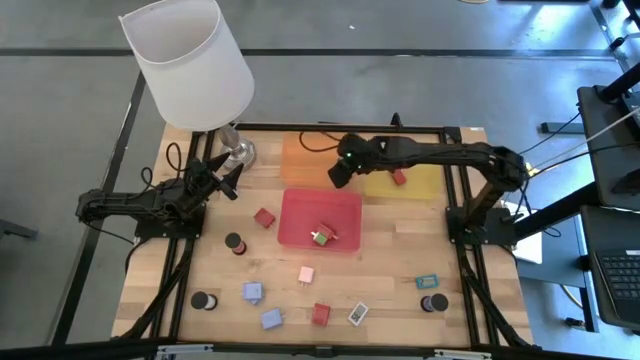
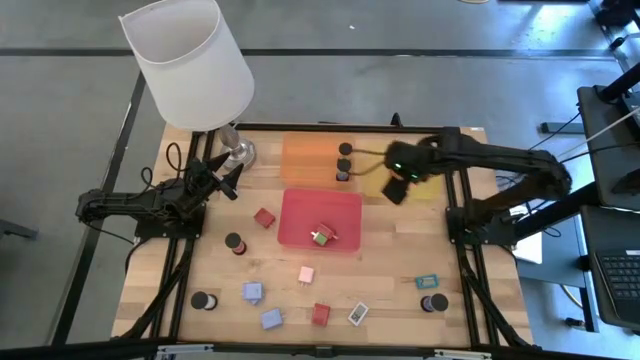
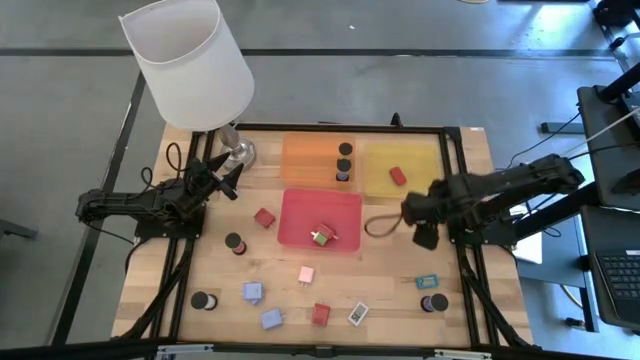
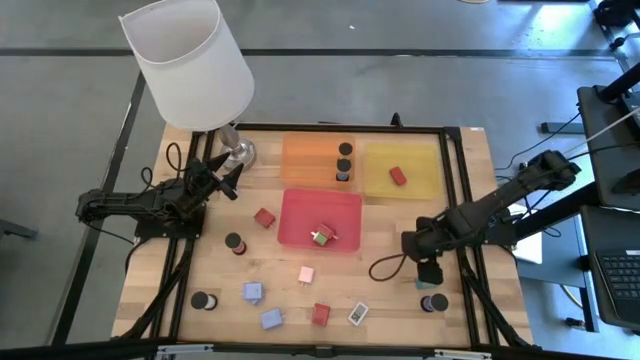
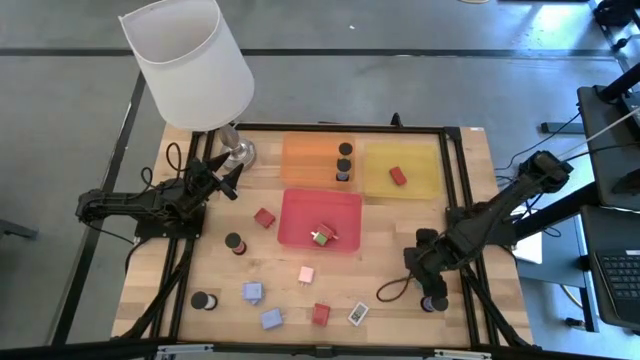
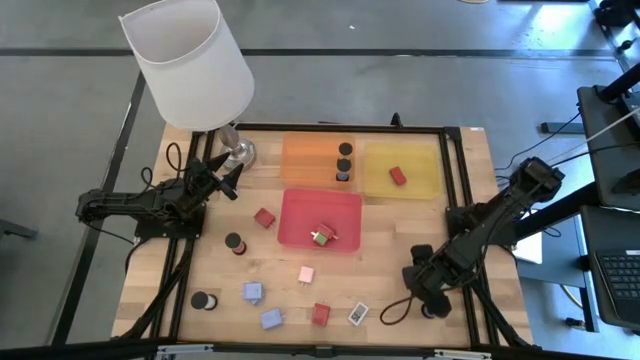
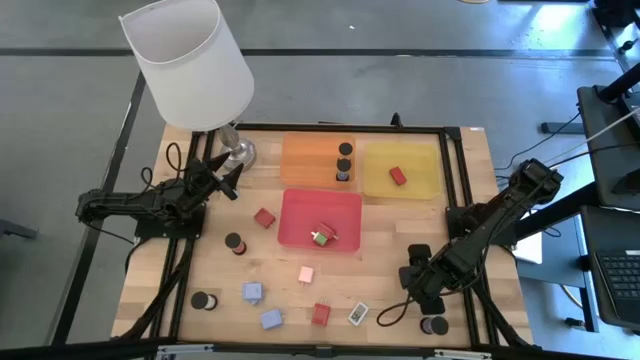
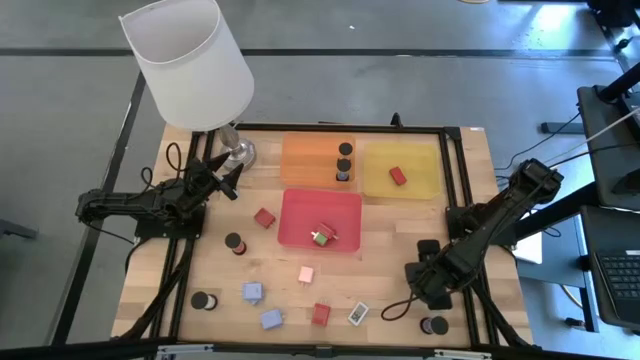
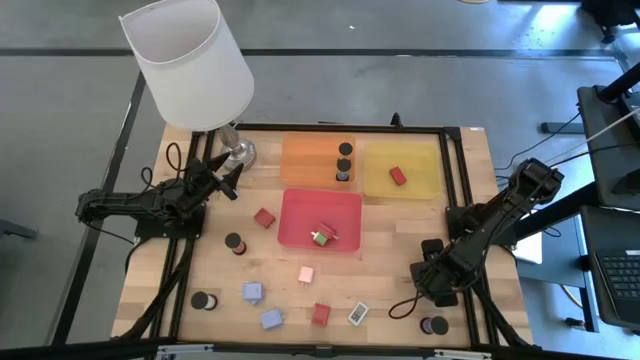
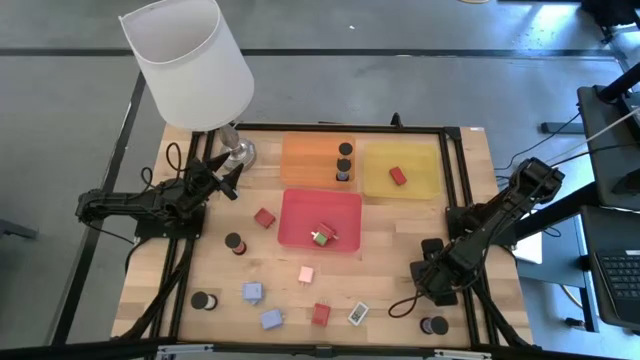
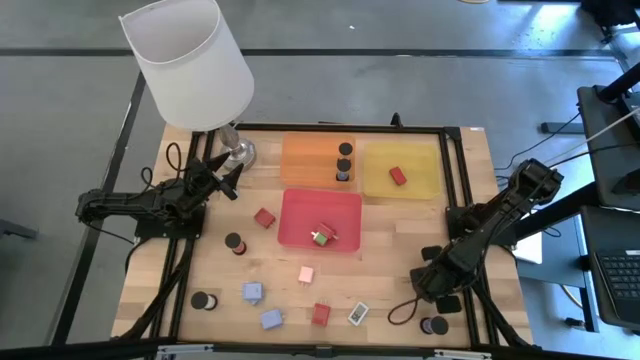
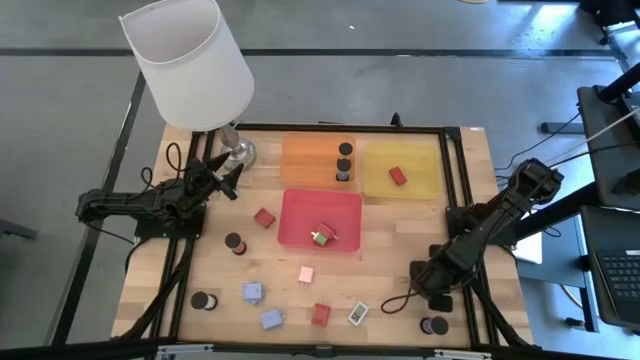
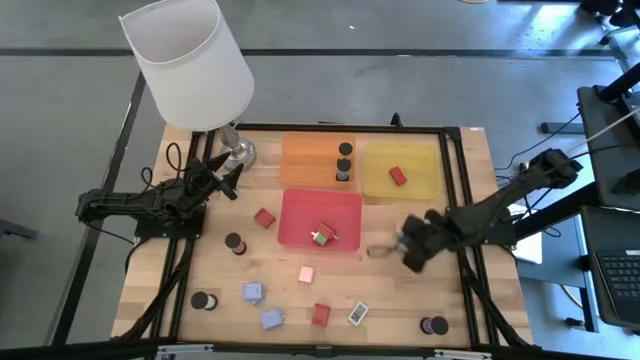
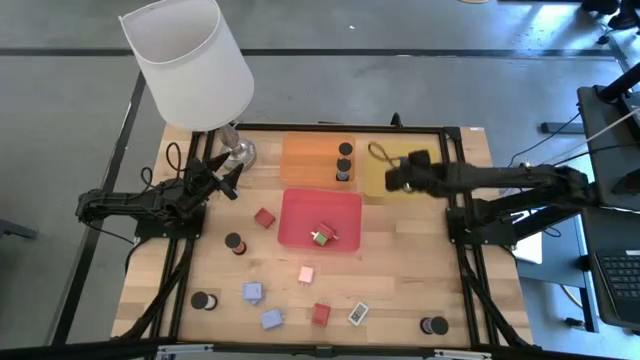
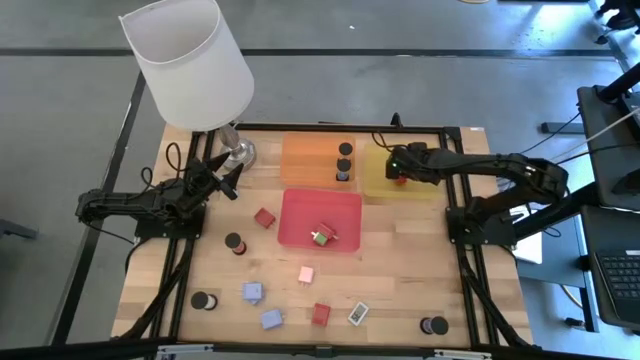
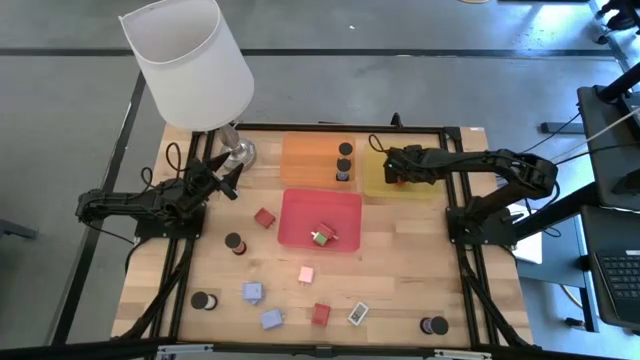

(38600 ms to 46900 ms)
Task: Pick & Place Office items
Put the blue digital clock into the yellow bin

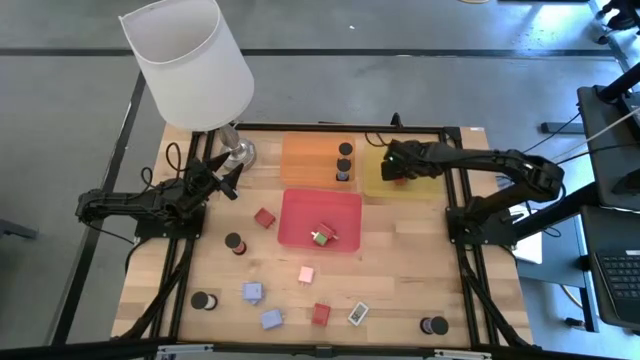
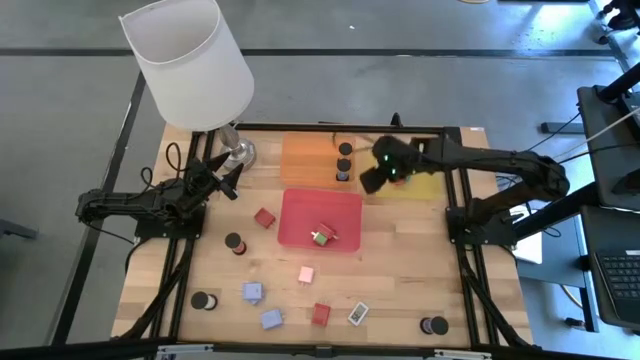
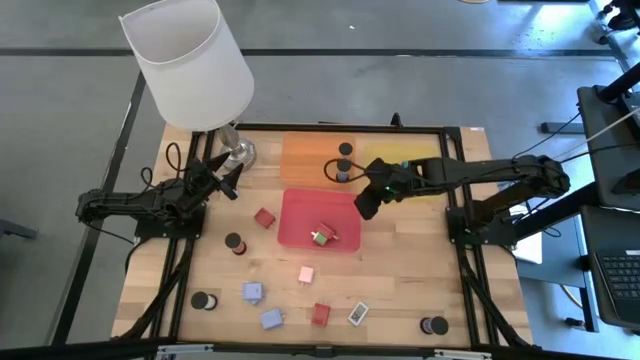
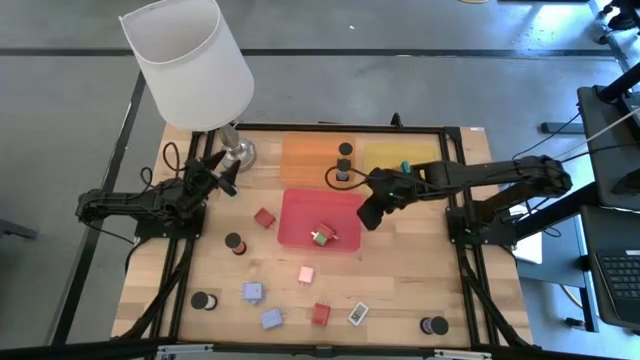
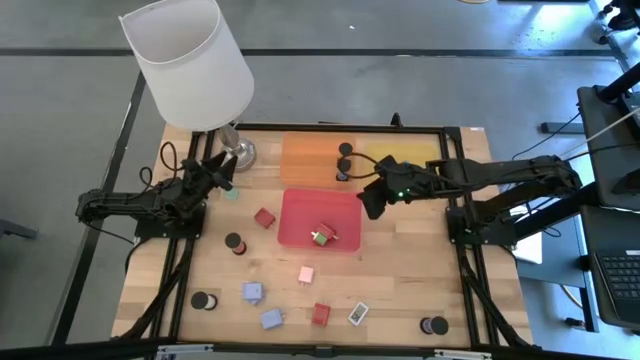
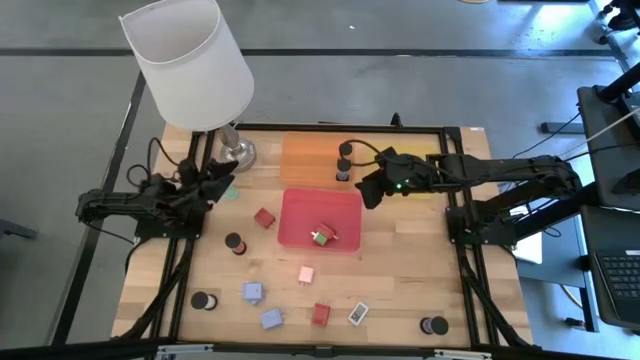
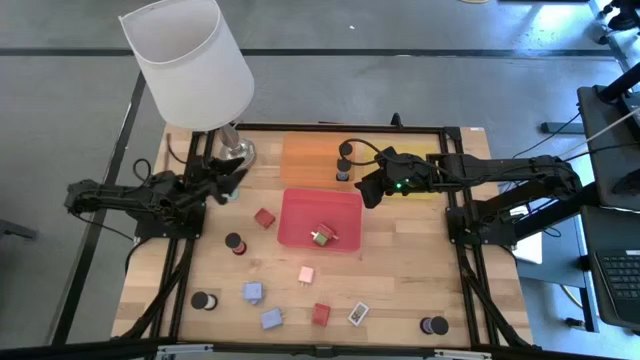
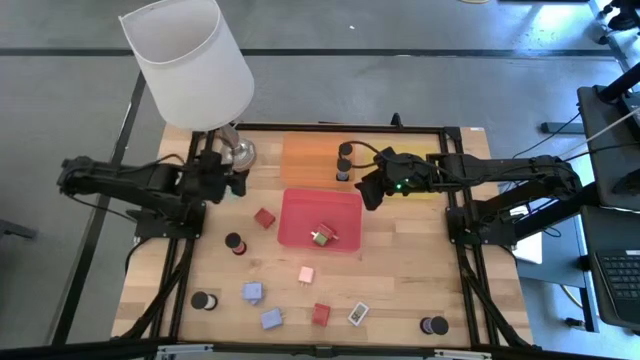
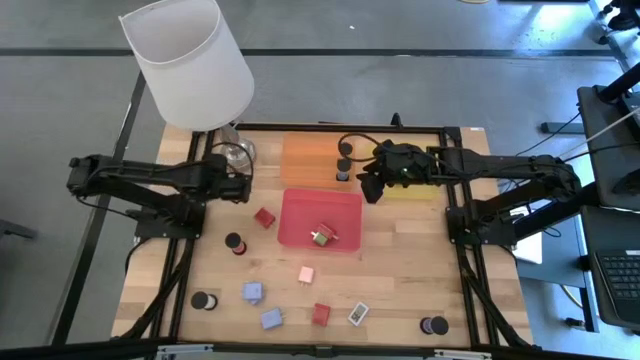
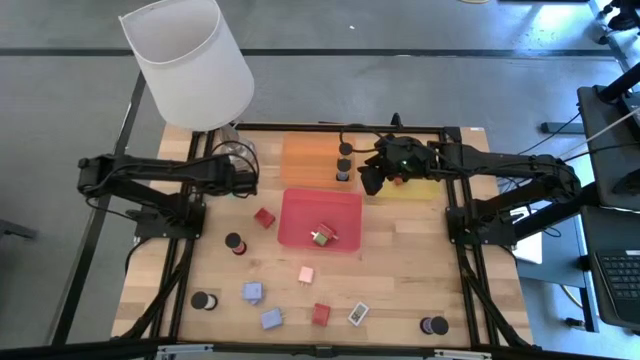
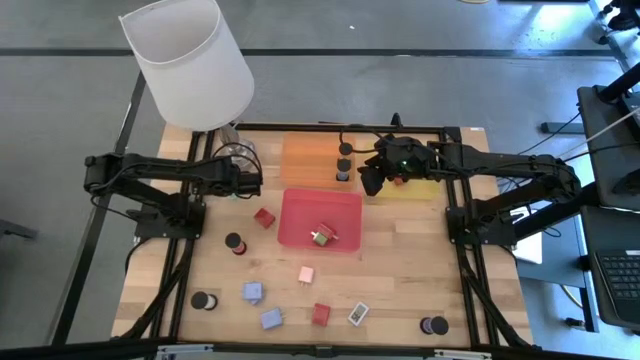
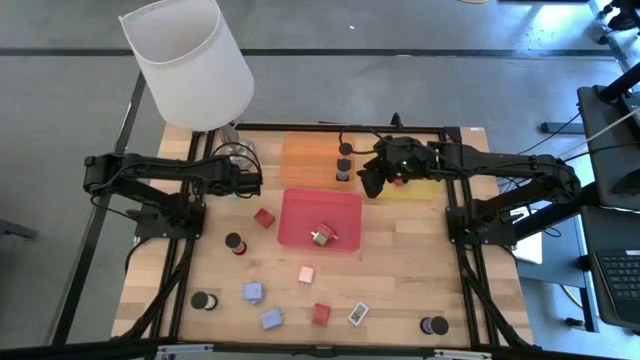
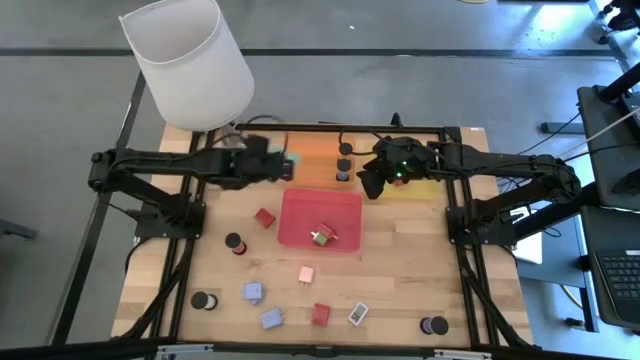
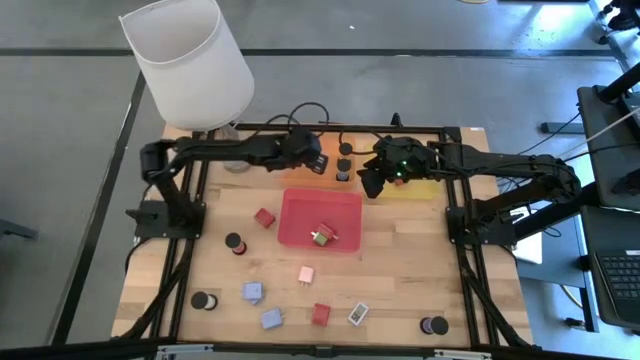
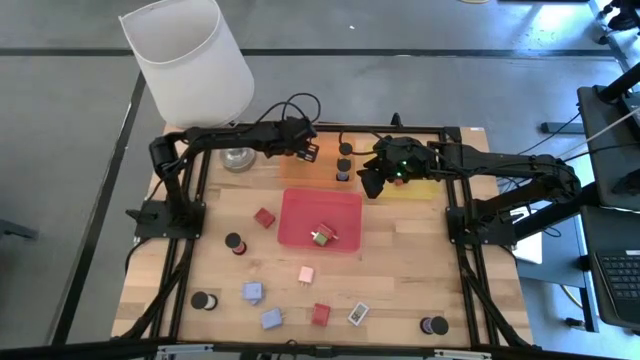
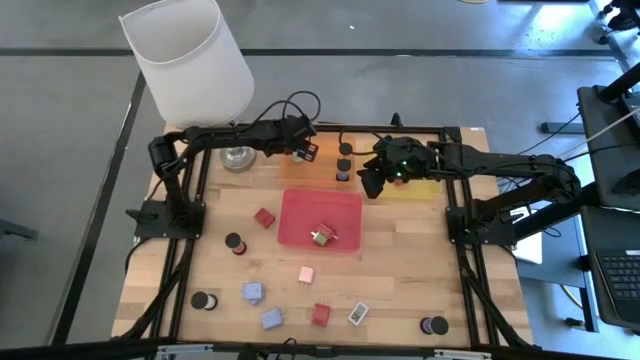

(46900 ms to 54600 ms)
Put the light blue hourglass into the orange bin

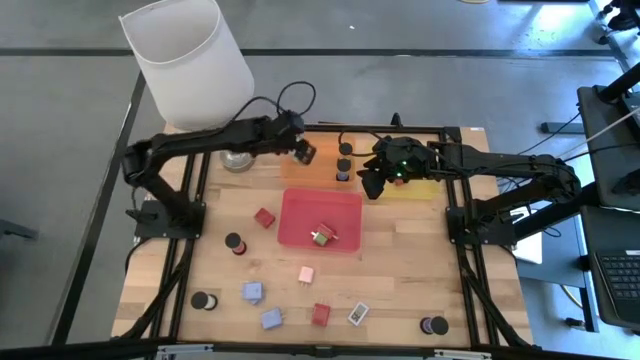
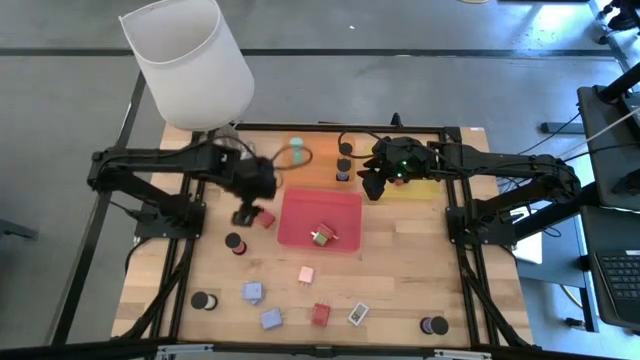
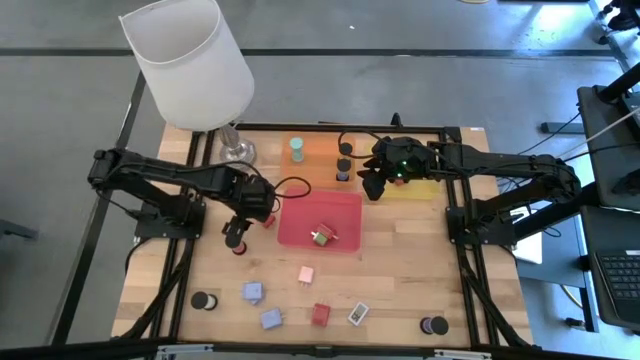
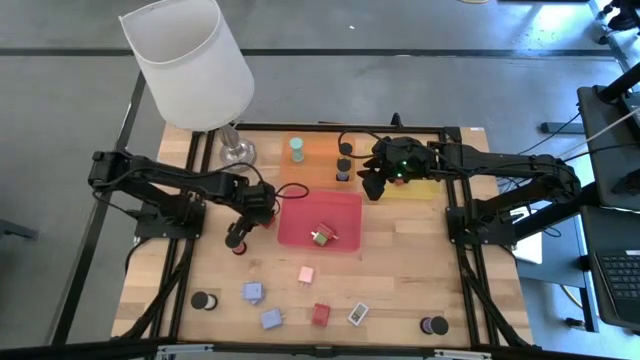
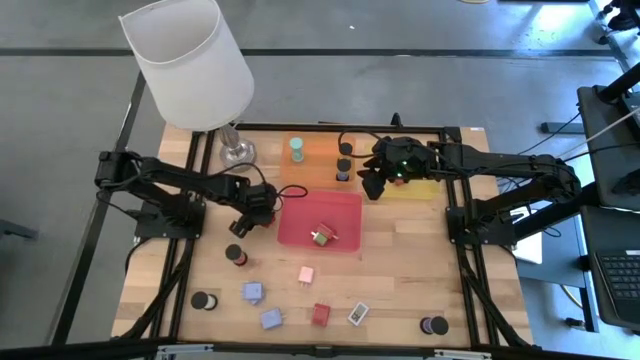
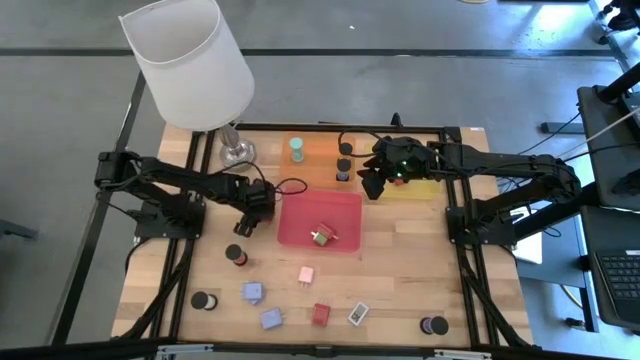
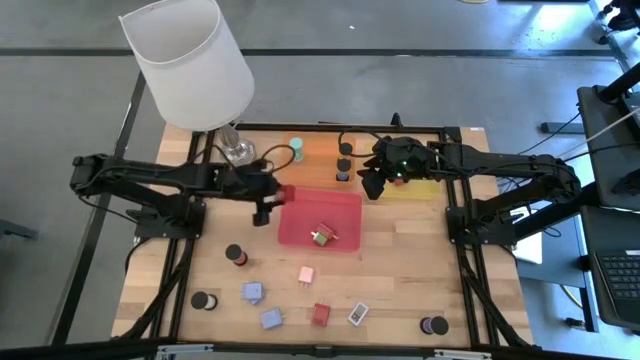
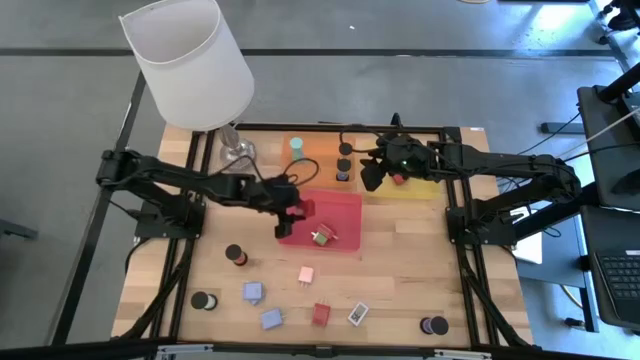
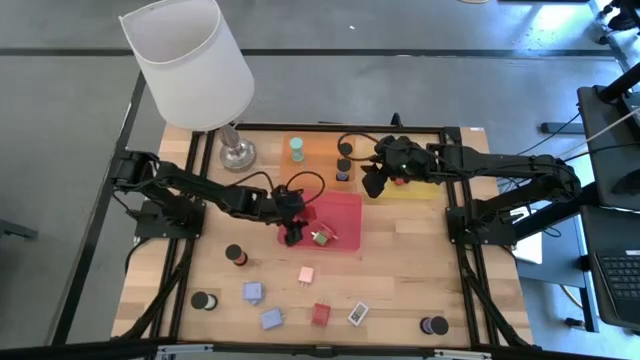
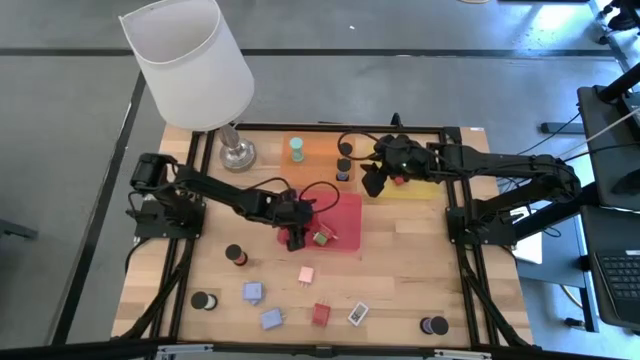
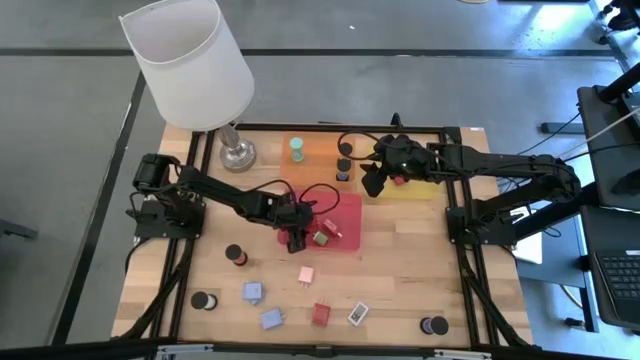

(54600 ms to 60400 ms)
Put the top red charger adapter into the red bin
